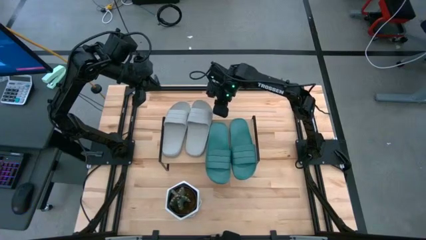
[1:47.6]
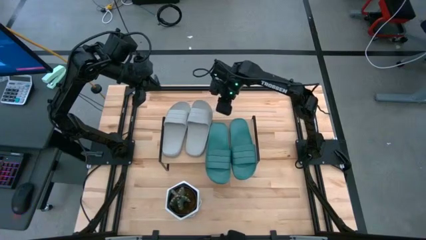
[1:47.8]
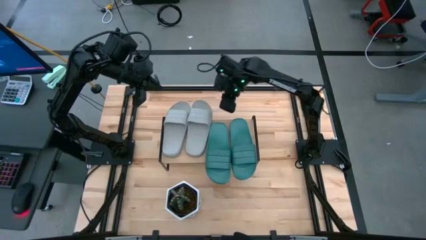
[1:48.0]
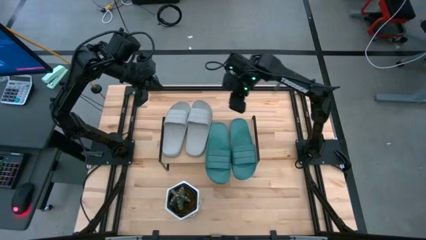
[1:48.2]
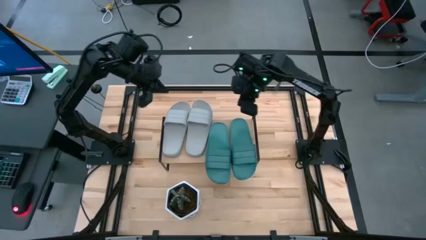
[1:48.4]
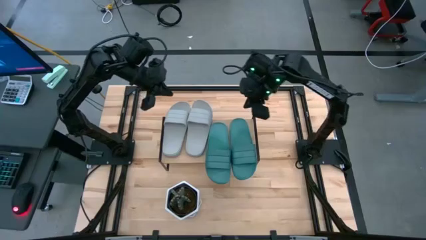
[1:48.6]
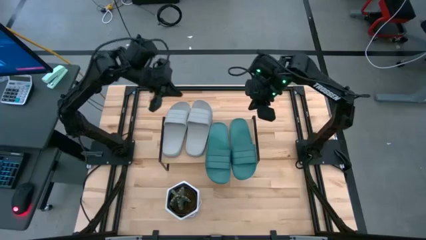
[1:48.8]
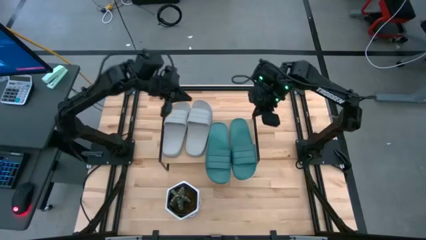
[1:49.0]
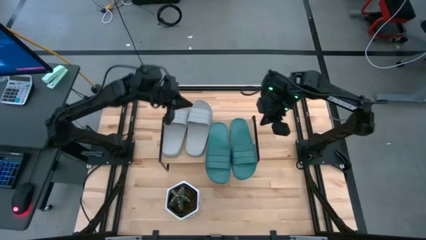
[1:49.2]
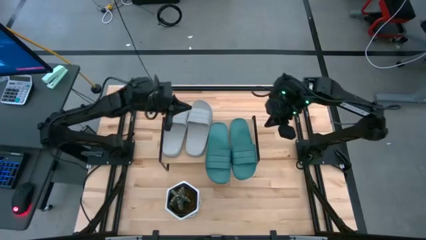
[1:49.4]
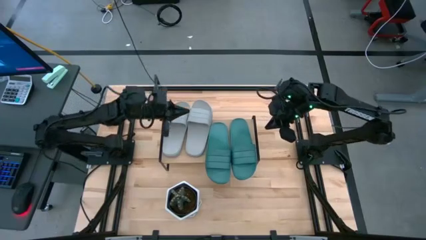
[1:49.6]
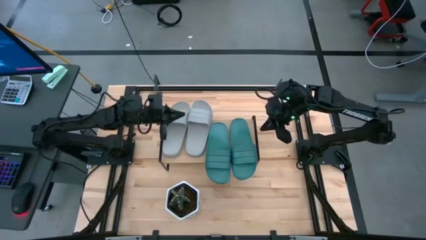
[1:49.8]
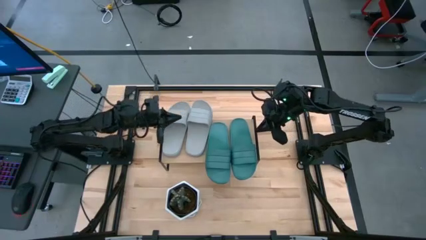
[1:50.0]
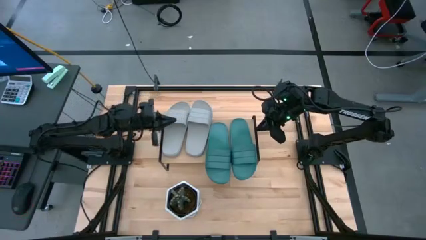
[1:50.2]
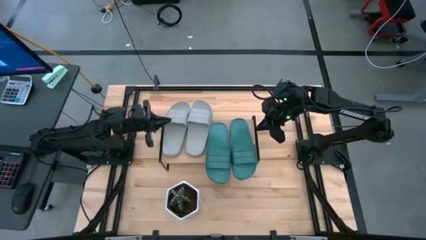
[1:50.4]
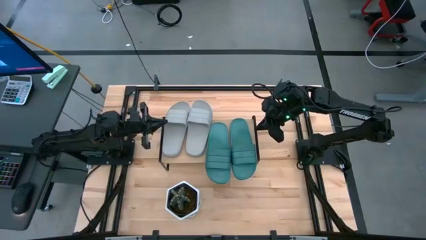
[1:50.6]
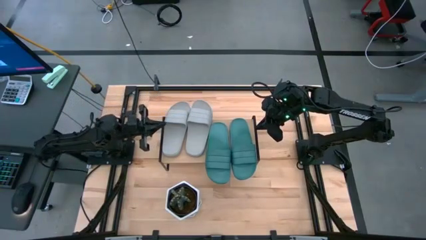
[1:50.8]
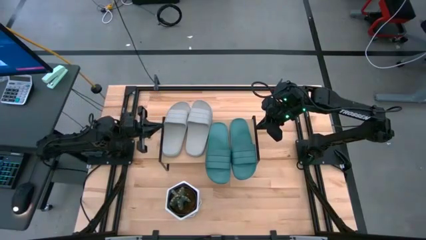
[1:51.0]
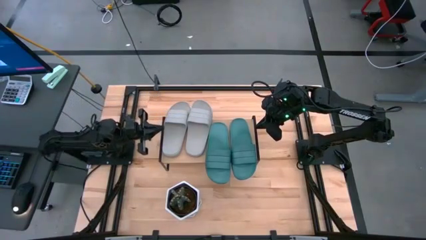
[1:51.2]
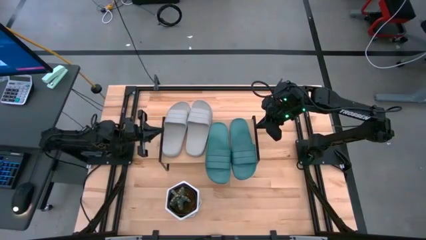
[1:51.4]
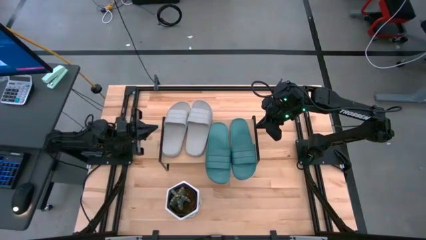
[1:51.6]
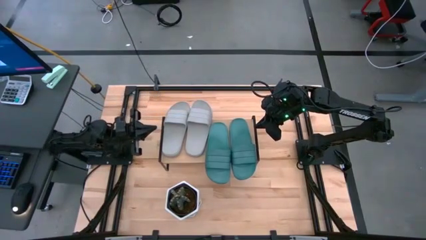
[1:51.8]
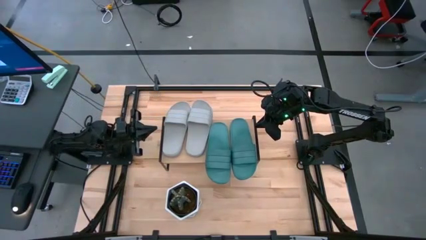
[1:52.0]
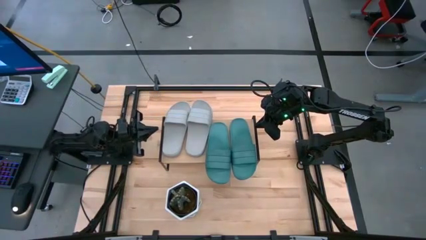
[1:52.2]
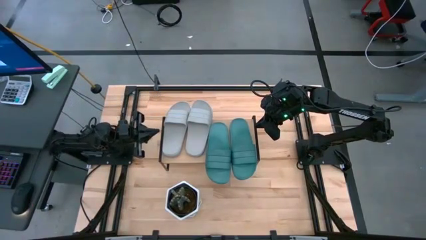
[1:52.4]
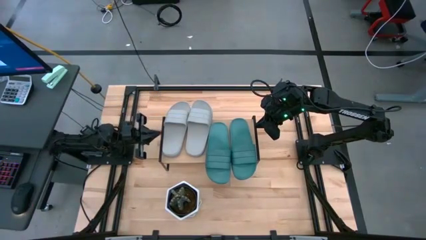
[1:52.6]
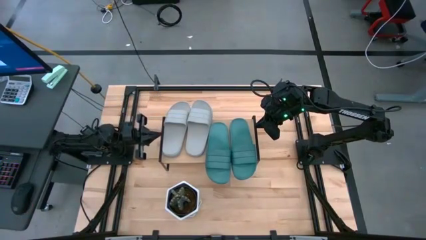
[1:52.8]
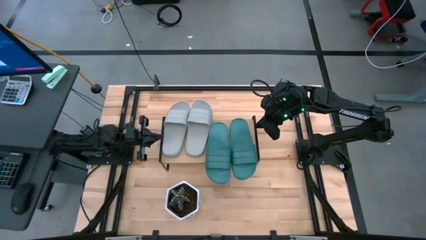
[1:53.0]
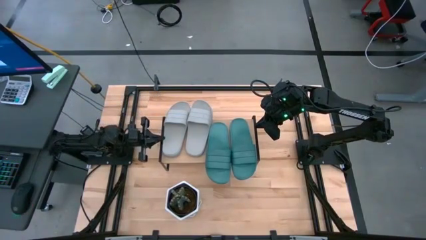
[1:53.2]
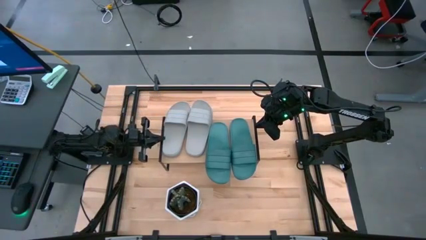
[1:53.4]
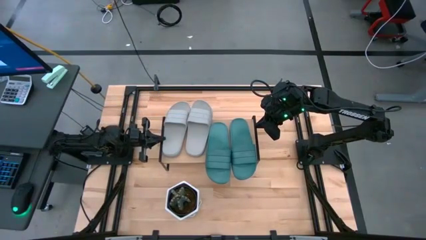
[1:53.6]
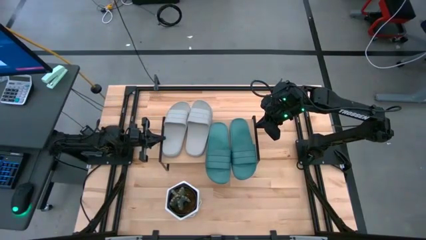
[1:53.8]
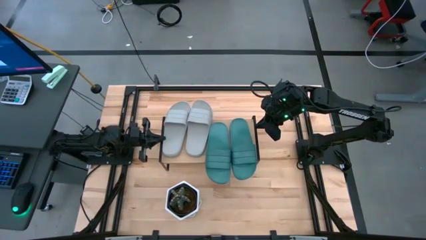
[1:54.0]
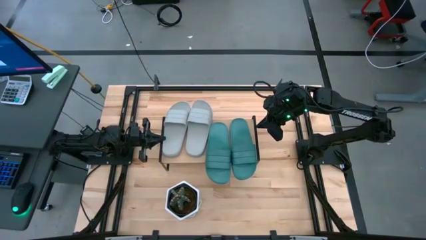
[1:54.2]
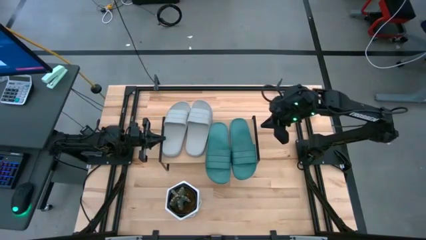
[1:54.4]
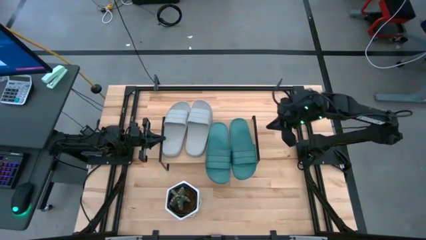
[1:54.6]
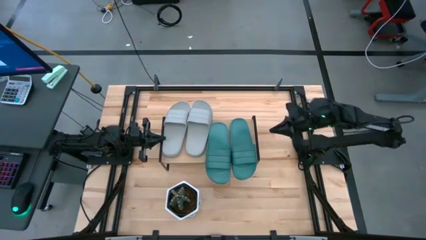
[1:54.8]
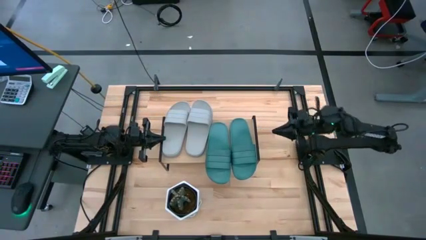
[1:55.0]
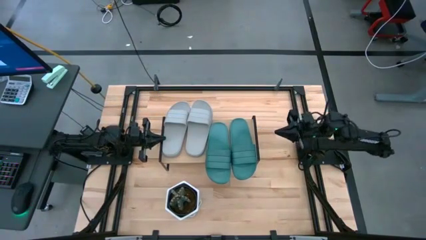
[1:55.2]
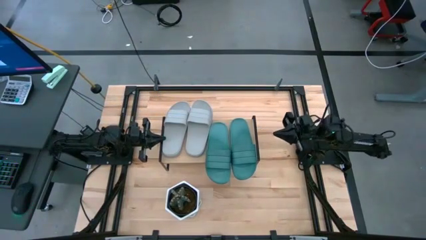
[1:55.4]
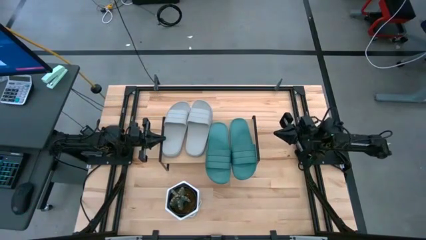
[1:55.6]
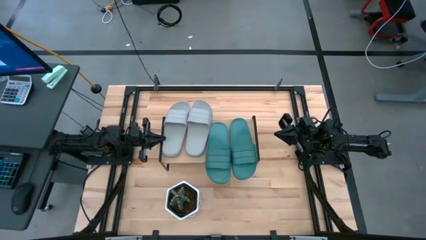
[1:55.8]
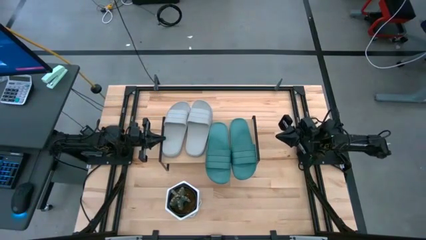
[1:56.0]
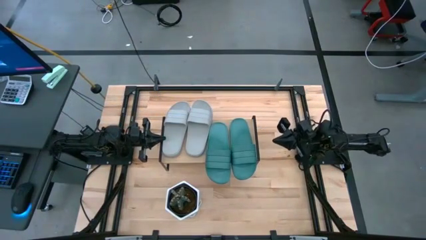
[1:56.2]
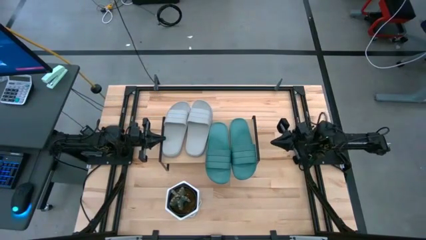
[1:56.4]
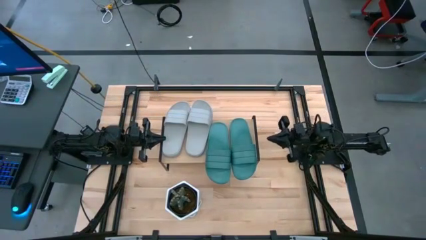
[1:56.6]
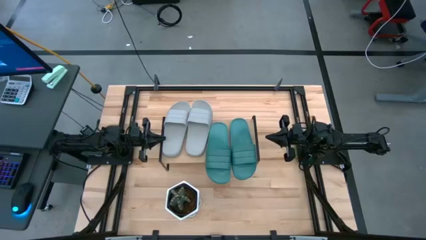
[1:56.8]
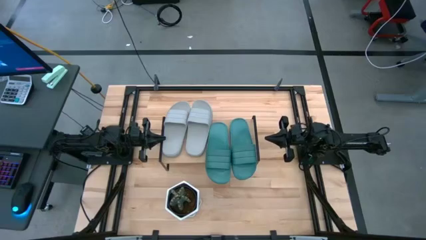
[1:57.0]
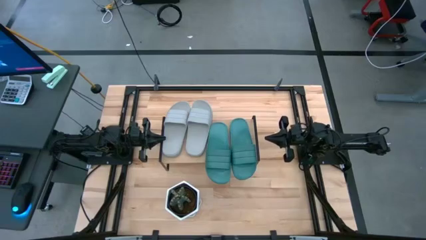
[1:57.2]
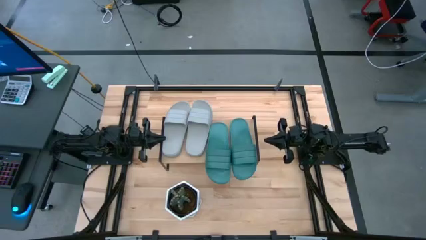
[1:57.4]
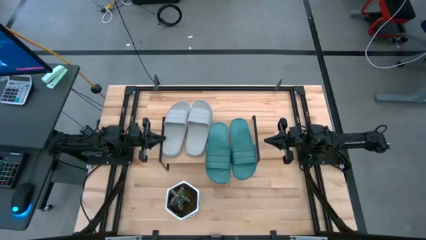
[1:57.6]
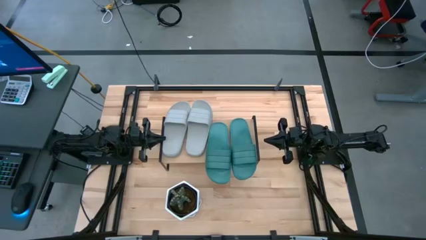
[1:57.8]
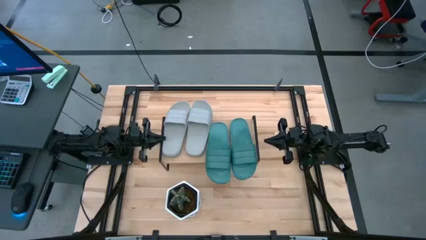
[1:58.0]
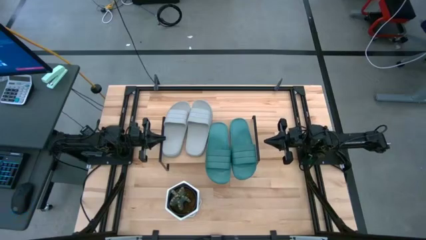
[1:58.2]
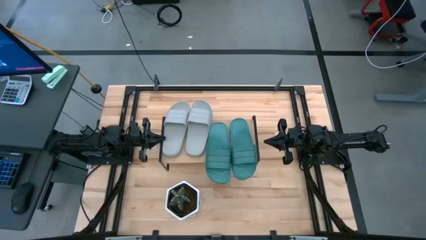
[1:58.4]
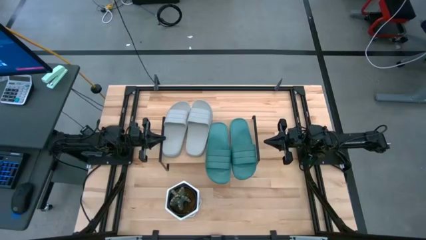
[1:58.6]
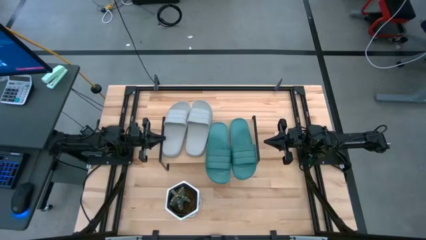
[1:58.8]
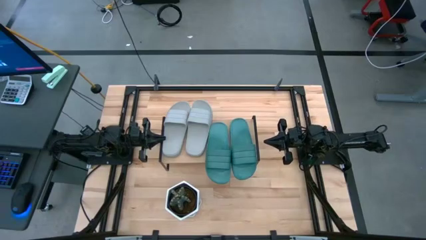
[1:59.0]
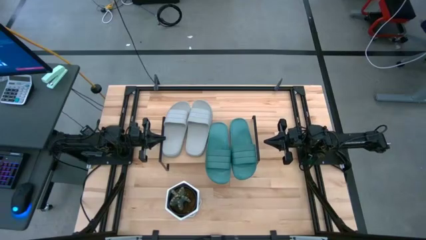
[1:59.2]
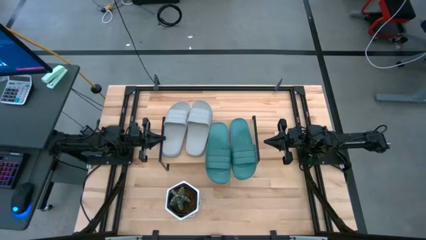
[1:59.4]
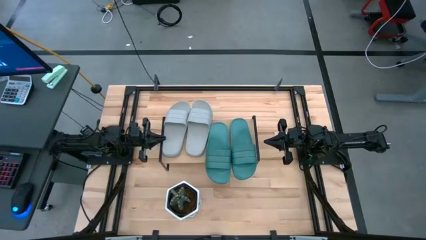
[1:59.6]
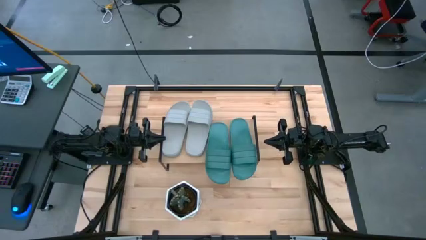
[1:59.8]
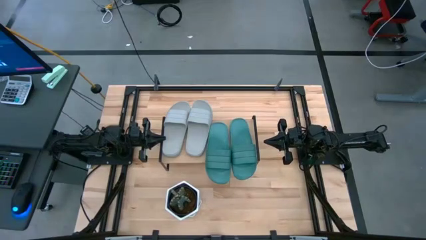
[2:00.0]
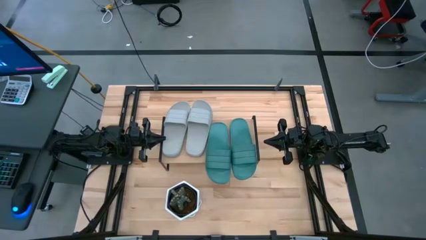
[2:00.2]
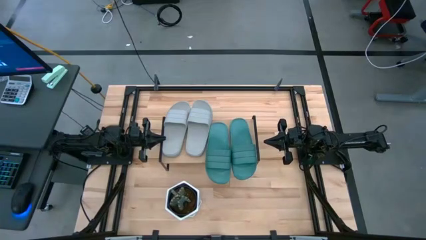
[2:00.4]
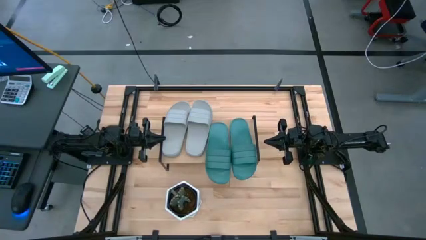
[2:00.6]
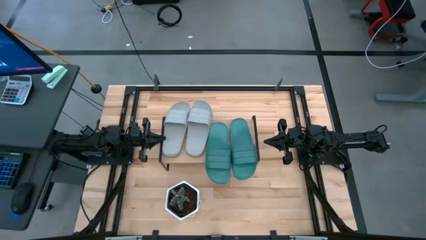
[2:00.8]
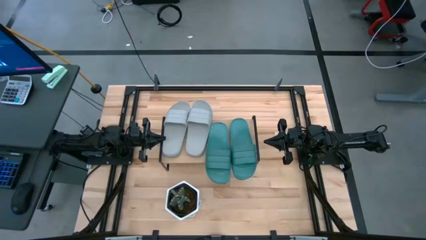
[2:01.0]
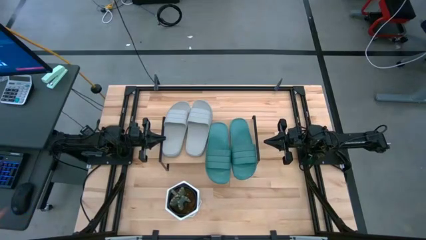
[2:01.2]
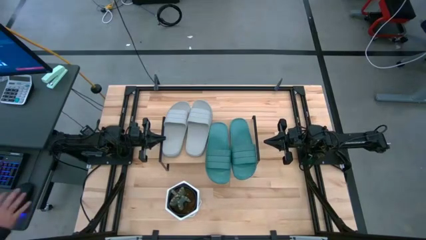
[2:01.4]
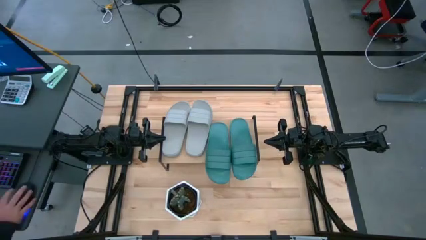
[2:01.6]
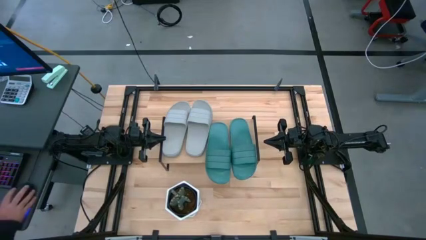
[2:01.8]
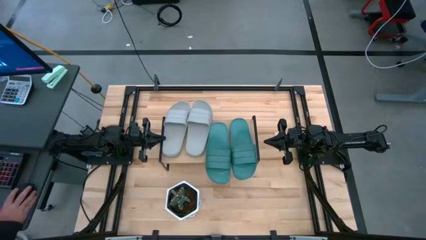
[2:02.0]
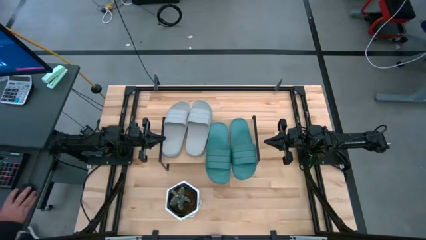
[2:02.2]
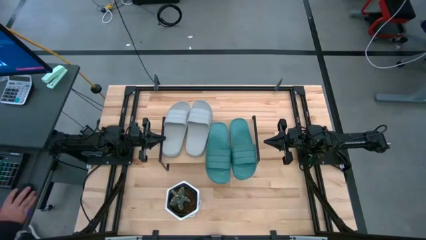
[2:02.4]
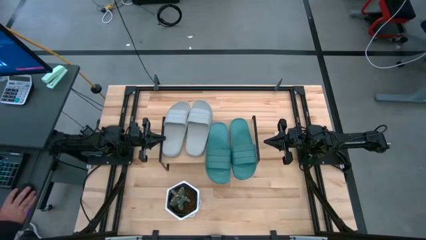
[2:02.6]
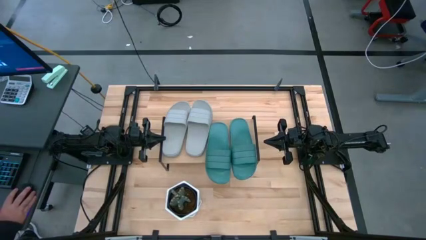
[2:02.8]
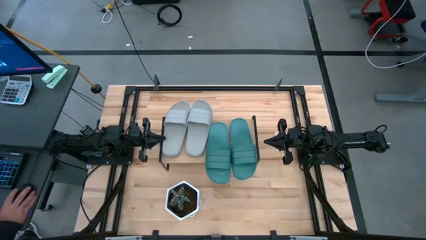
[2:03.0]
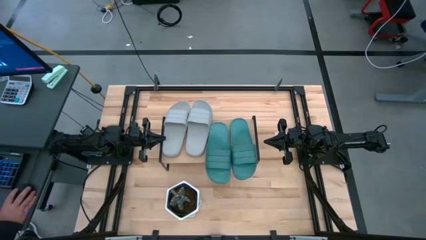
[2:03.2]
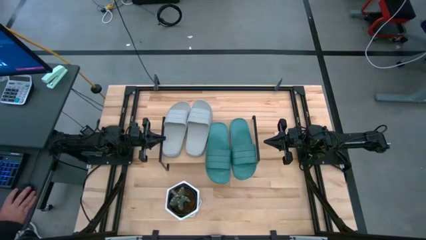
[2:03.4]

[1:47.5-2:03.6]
Task: Pick and place slides into the shelf
Return to Home Position

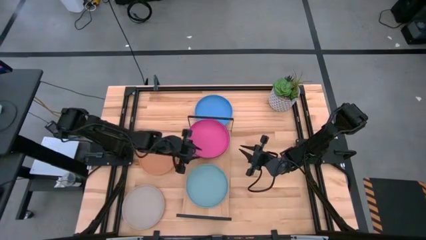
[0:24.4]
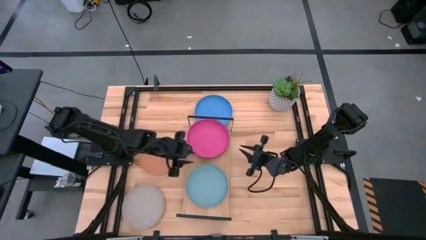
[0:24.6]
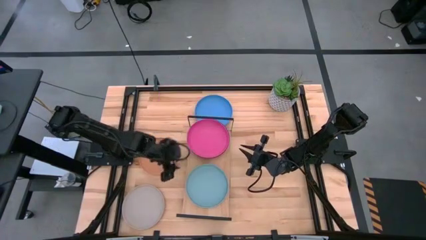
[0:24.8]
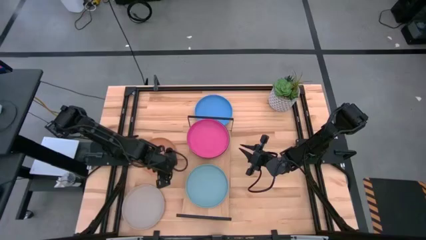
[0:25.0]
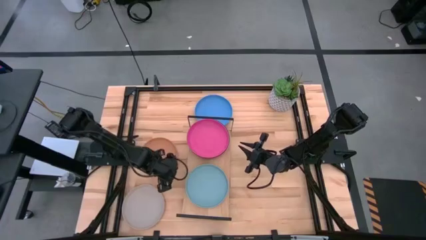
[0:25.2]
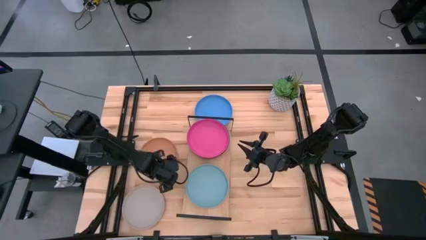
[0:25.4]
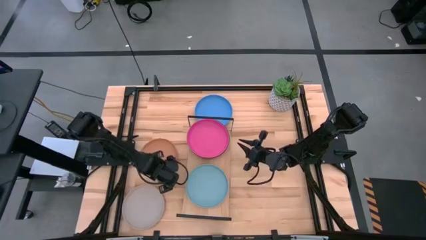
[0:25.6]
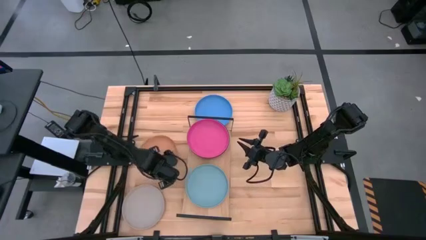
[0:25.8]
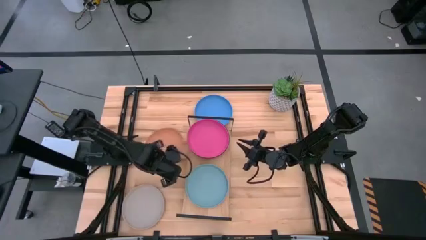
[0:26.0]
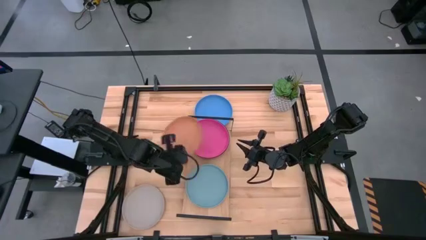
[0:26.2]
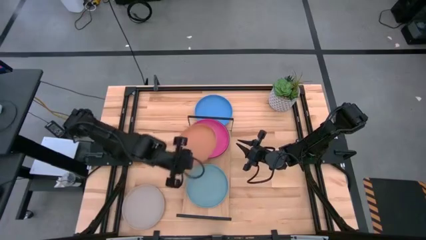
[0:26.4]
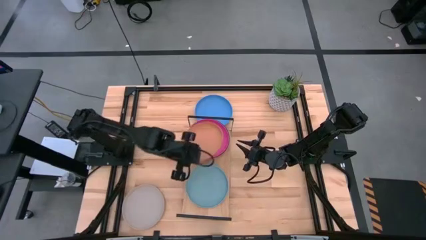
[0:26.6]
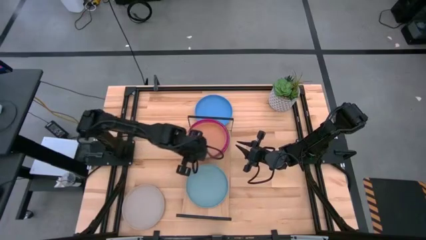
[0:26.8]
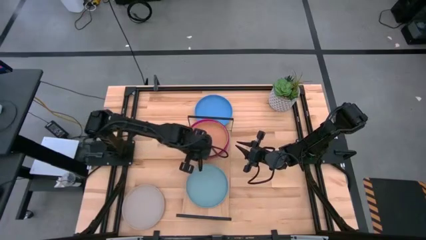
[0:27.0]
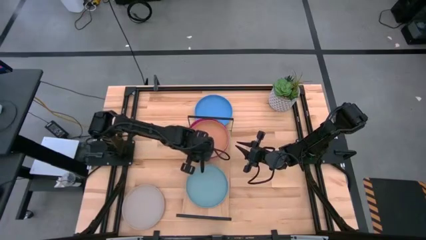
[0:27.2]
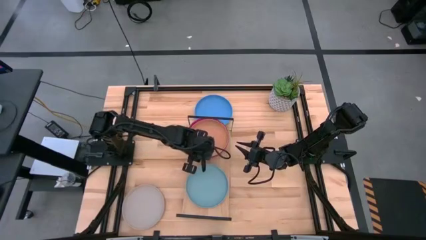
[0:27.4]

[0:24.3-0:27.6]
Task: Place and stack plates onto a shelf
Stack the brown plate on top of the light blue plate on the shelf
